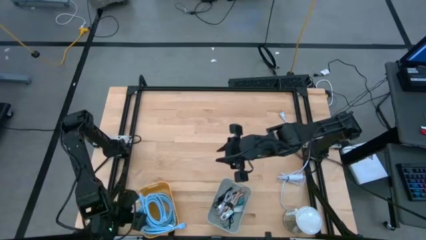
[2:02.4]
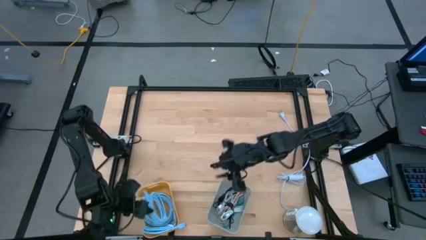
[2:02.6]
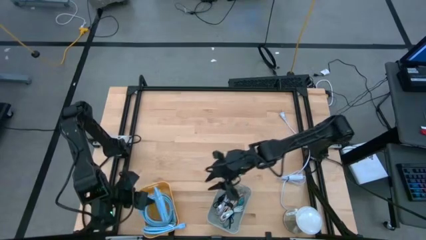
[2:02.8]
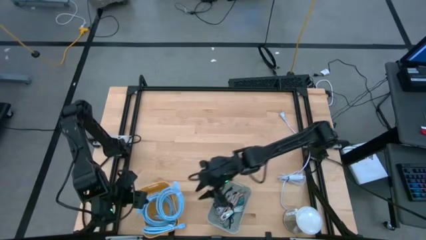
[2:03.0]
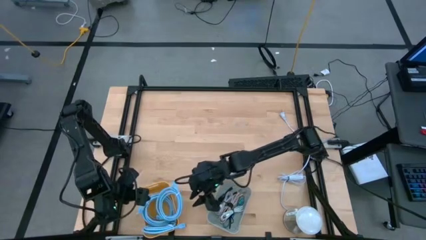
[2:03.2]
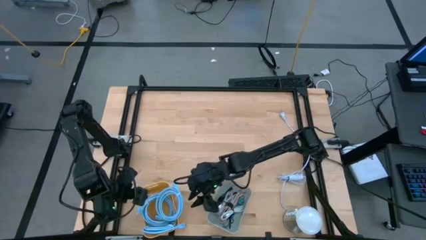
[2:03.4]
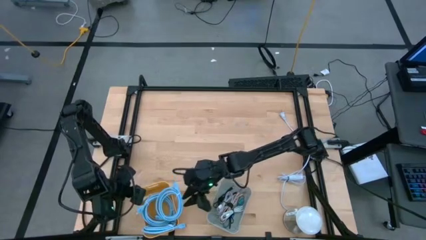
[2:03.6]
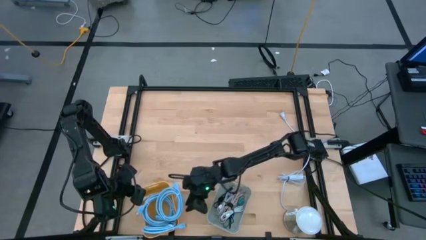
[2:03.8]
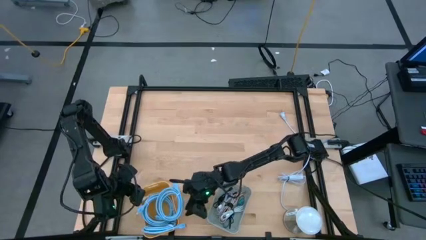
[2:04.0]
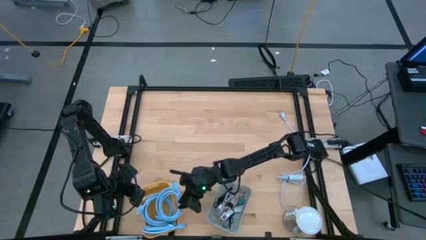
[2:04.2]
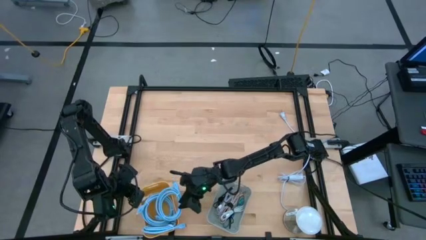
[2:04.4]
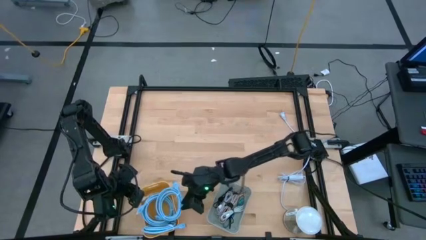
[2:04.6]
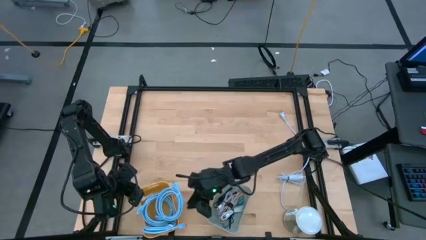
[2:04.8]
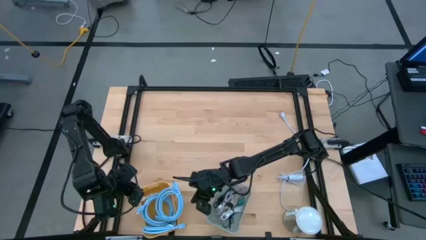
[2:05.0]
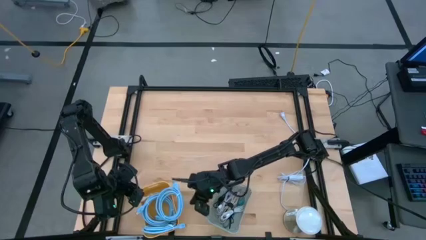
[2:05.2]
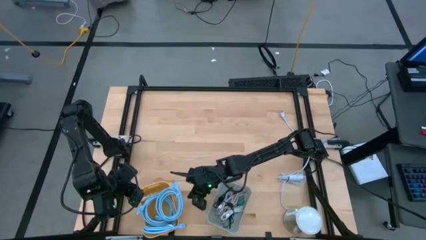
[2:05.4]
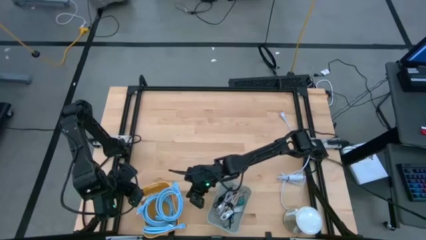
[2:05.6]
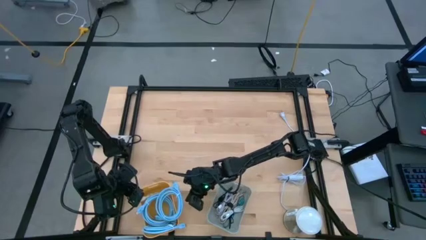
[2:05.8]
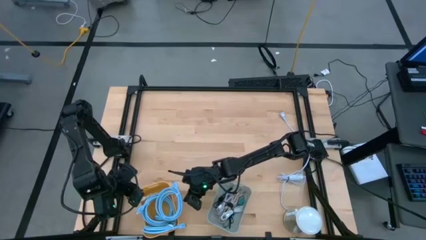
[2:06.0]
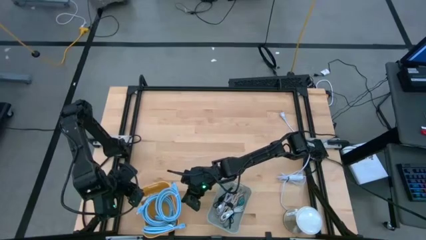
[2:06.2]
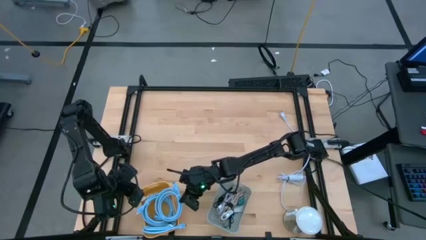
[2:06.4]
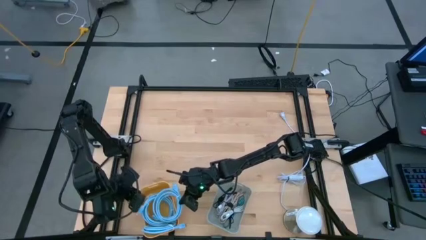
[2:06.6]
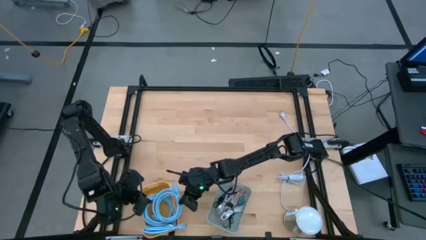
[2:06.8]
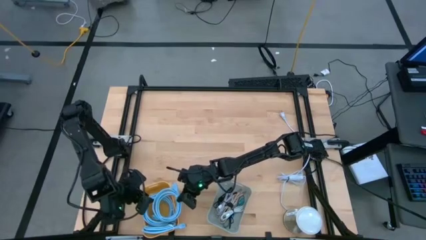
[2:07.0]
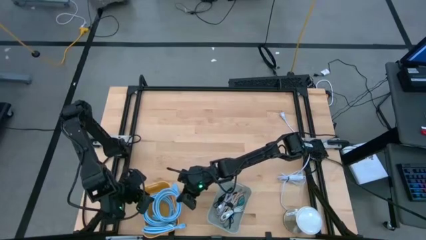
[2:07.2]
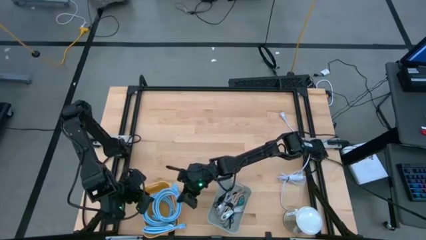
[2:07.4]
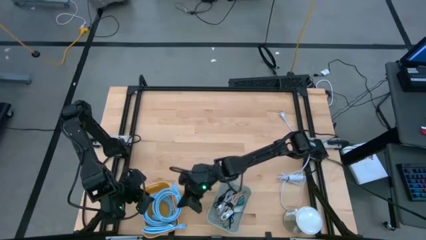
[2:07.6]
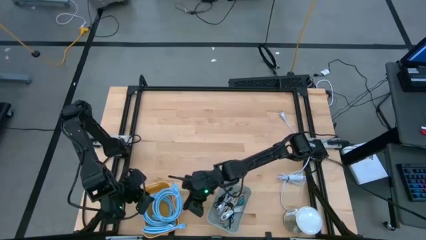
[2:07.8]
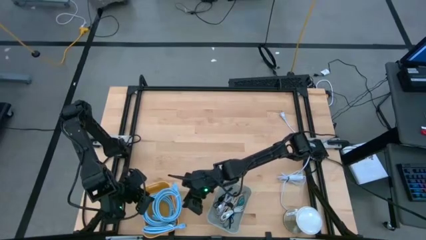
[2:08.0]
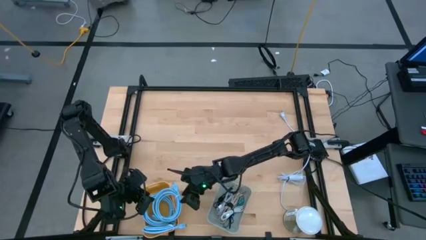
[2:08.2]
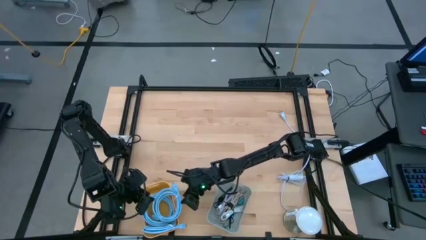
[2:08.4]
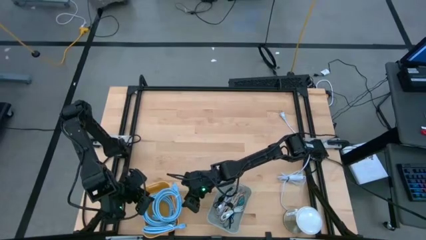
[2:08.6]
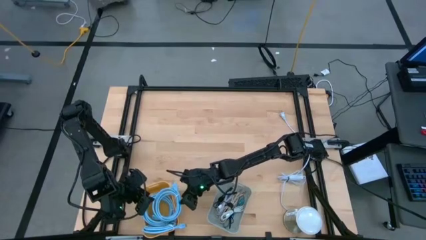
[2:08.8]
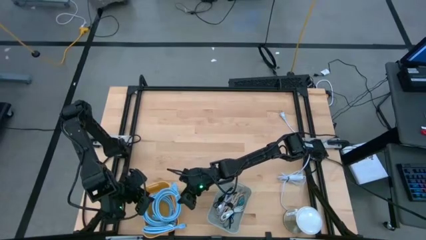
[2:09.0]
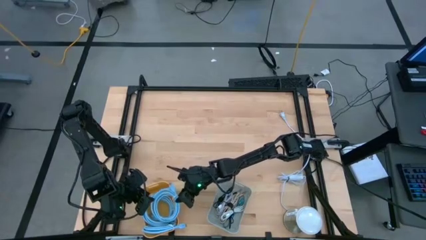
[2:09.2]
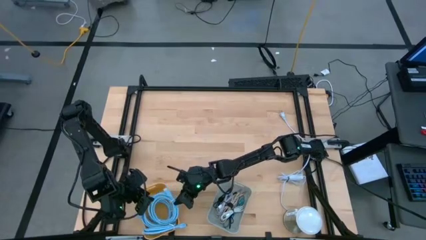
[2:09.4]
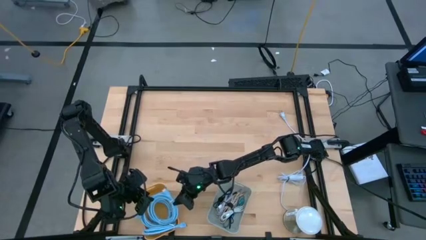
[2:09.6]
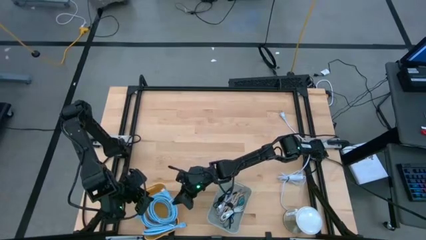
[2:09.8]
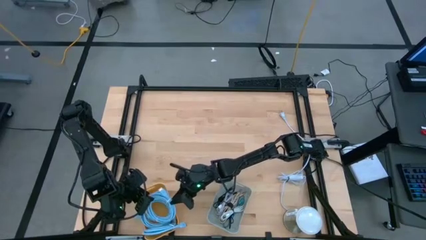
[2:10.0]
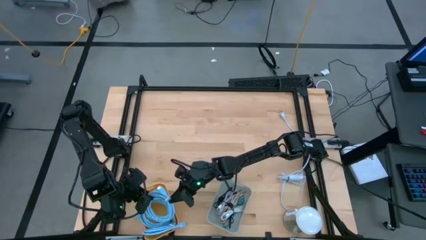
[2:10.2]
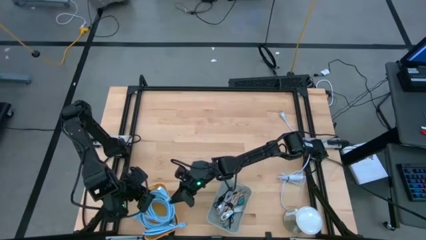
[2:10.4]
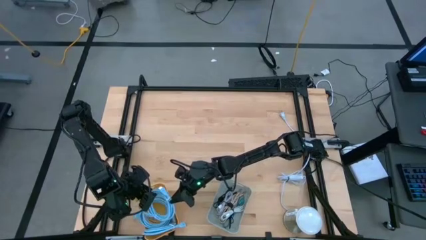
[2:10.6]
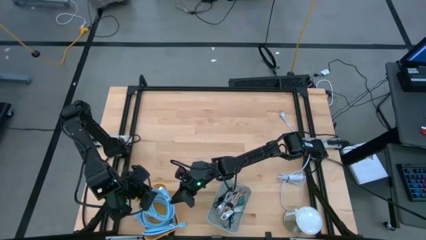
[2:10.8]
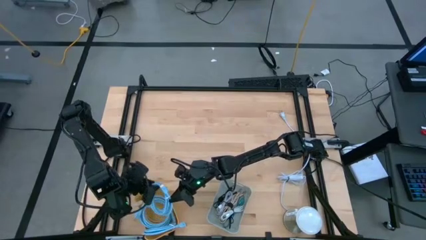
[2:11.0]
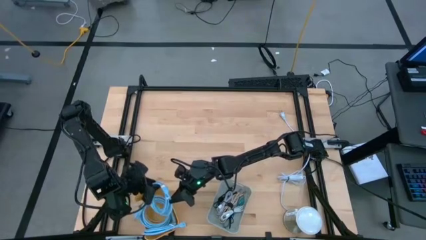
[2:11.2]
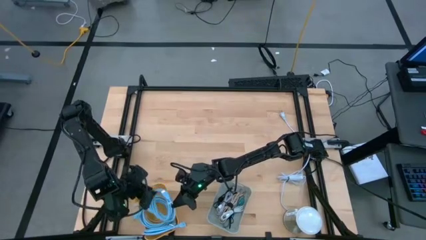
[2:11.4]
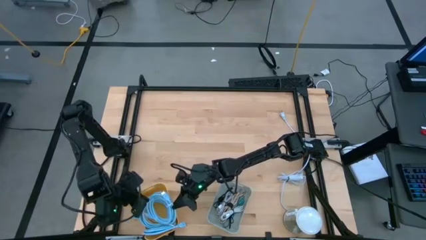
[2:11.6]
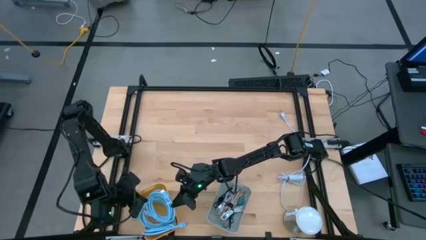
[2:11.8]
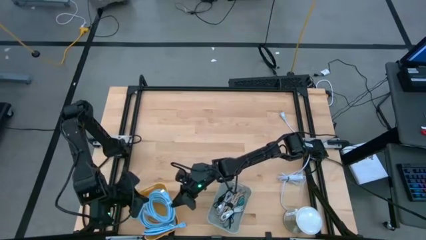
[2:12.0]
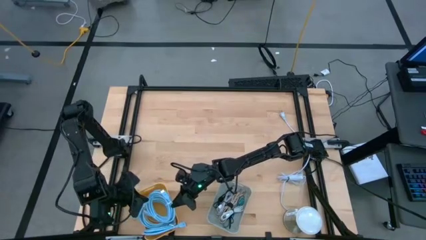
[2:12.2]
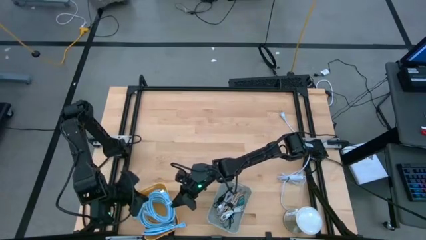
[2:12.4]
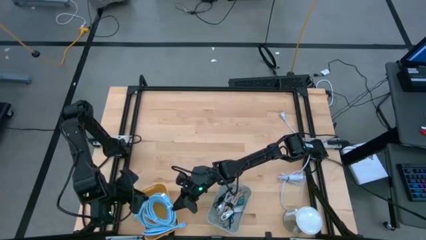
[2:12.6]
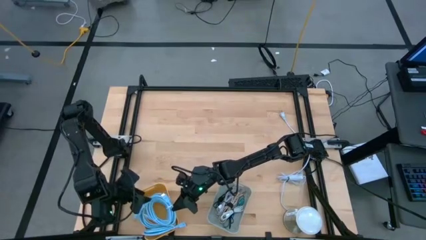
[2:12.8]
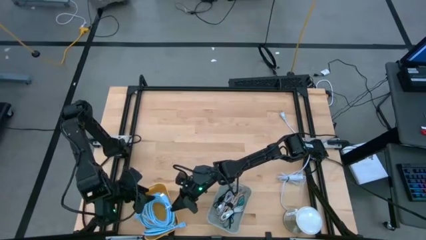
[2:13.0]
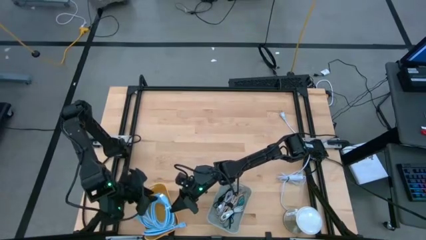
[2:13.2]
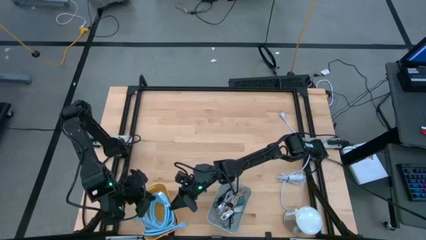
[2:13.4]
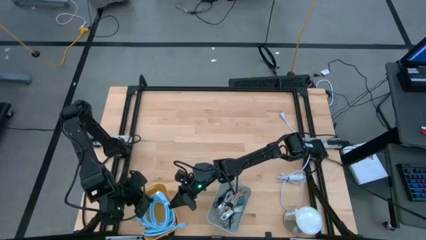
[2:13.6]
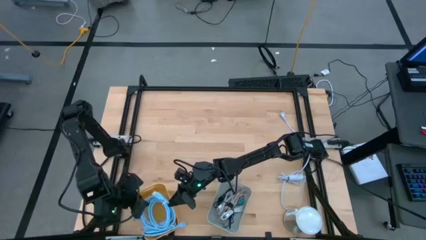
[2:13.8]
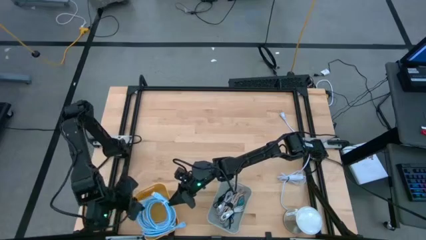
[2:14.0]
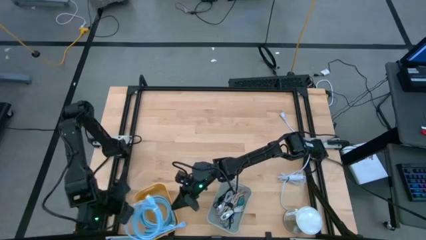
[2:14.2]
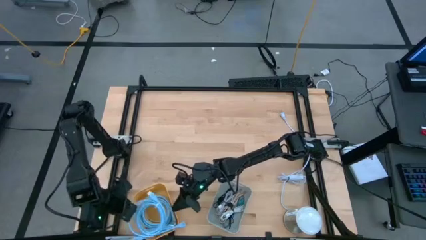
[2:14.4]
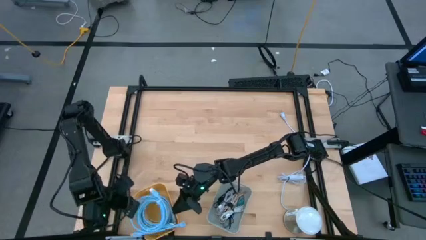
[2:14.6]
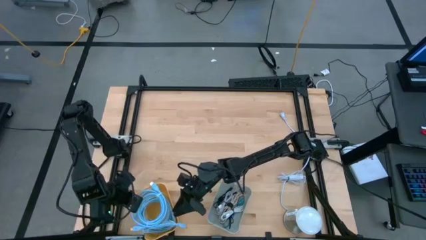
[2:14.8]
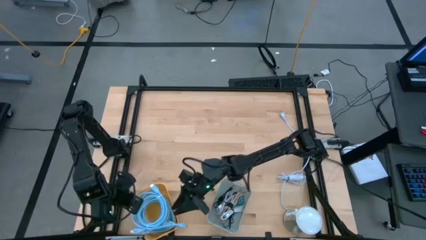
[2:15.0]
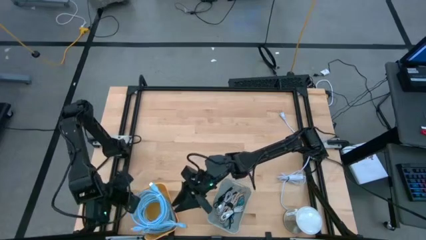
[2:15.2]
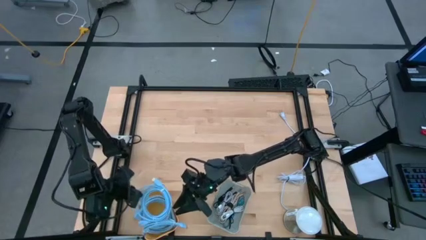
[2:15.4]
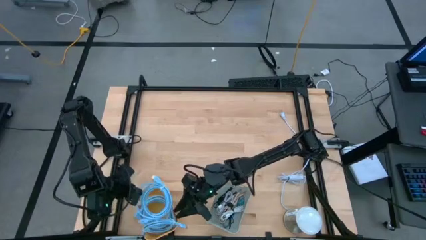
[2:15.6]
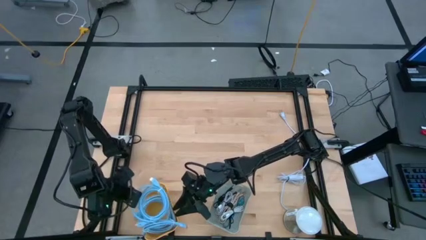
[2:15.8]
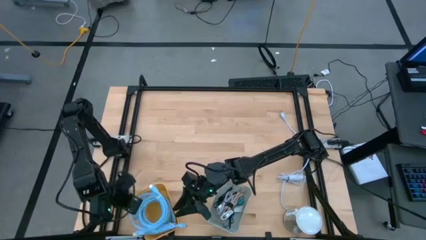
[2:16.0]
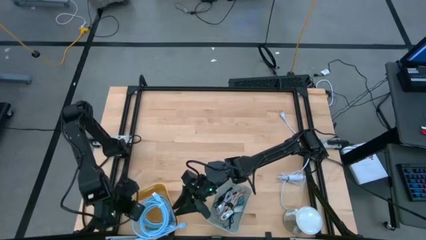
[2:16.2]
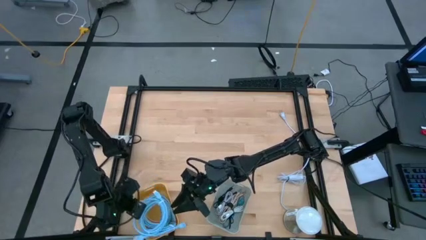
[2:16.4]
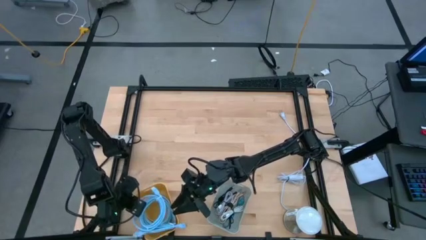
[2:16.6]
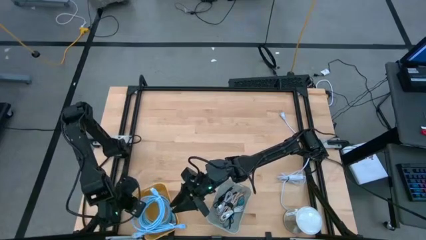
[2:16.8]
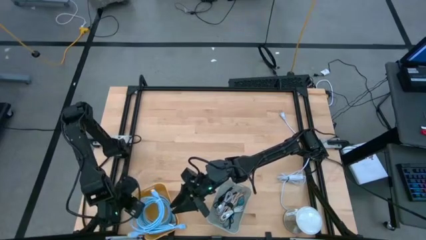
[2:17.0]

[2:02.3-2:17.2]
Task: Sort cables
Put the blue HDMI cable into the yellow bin
